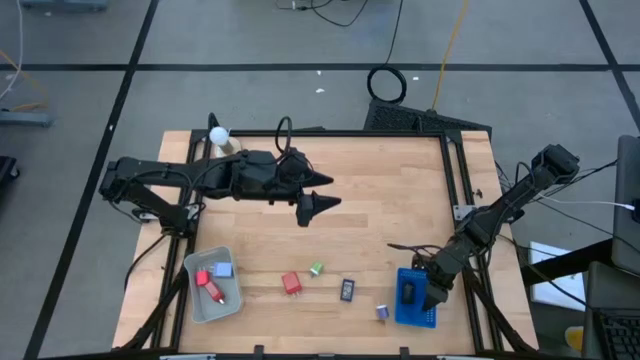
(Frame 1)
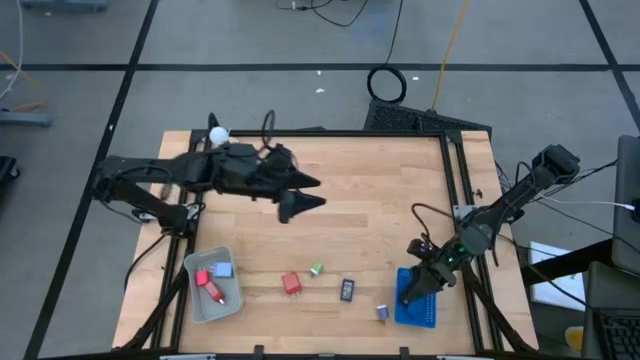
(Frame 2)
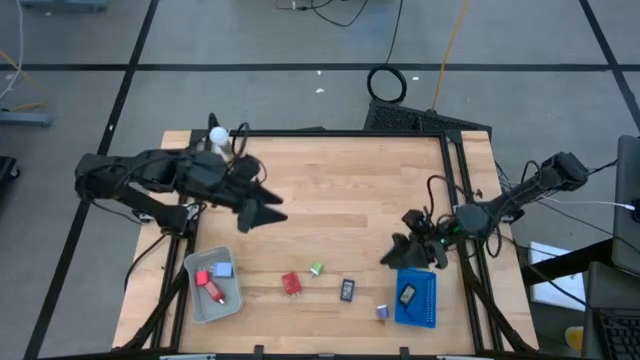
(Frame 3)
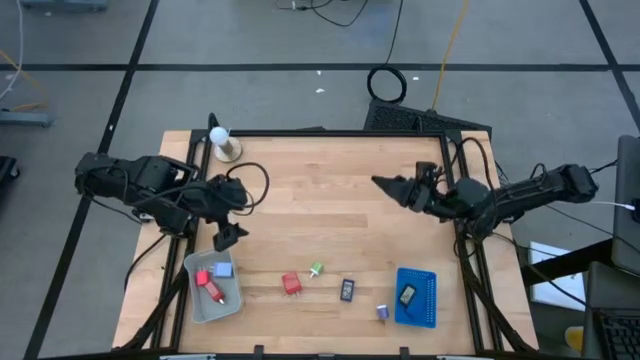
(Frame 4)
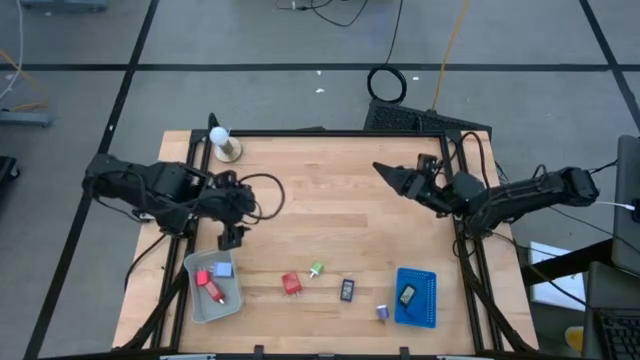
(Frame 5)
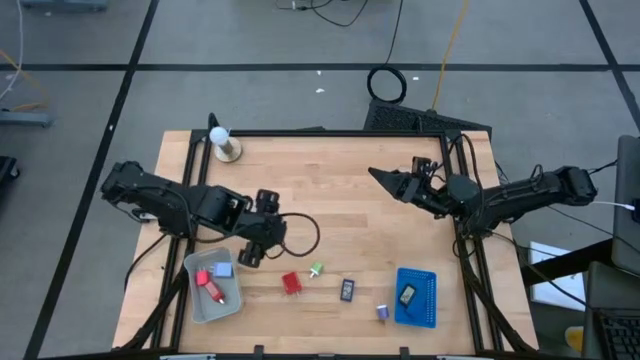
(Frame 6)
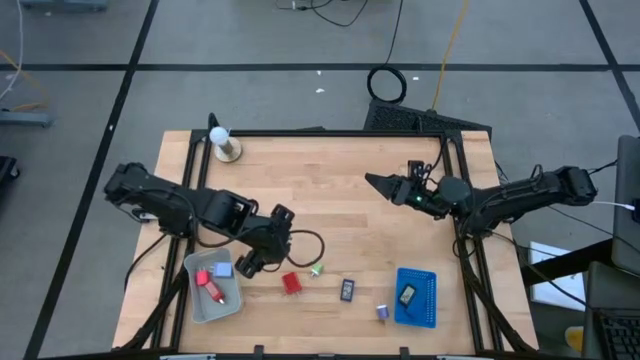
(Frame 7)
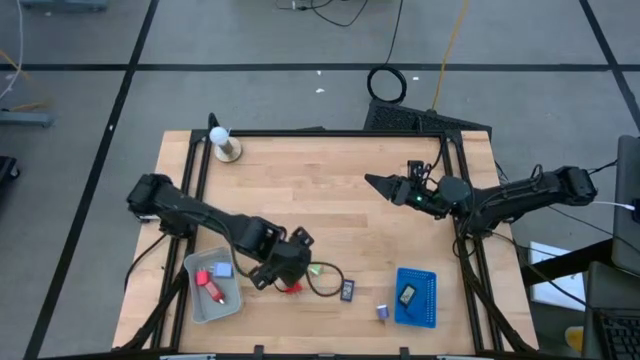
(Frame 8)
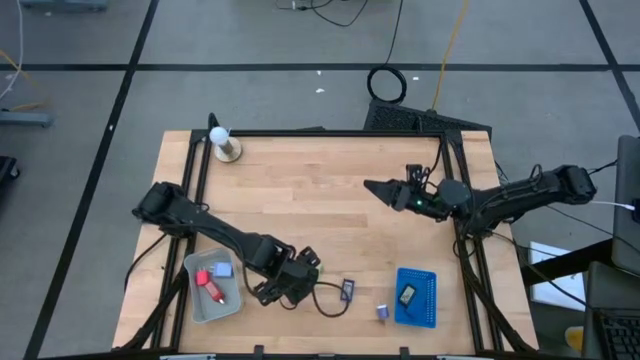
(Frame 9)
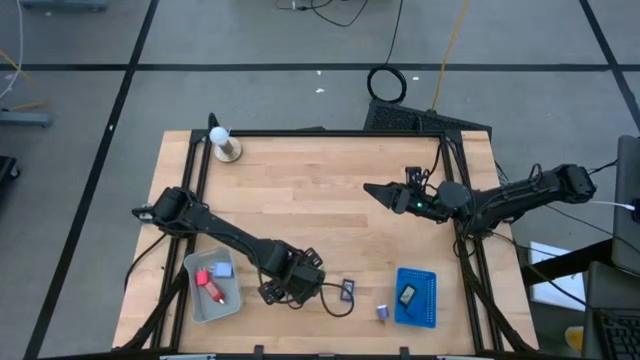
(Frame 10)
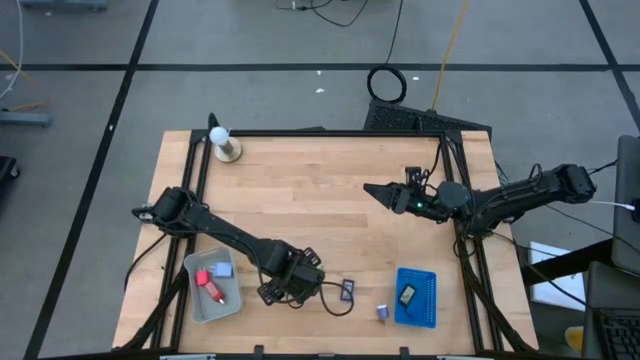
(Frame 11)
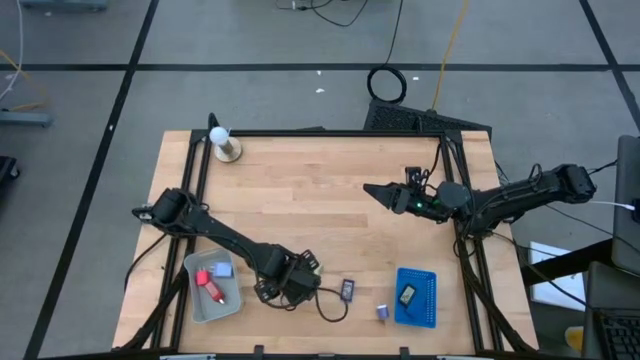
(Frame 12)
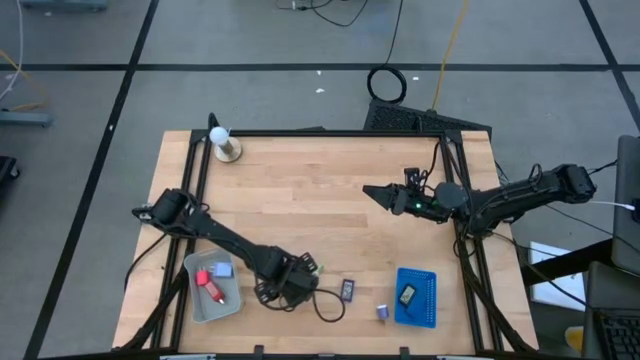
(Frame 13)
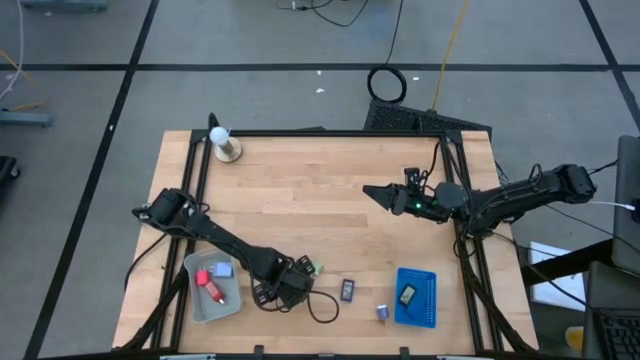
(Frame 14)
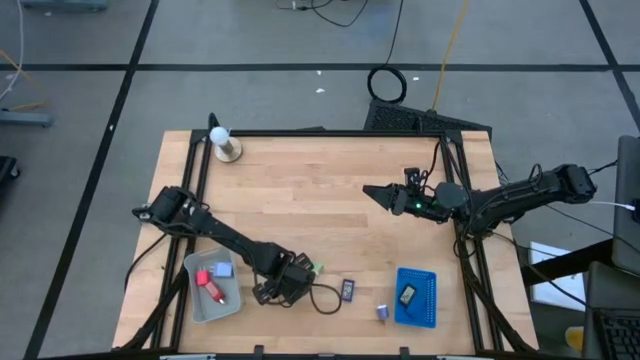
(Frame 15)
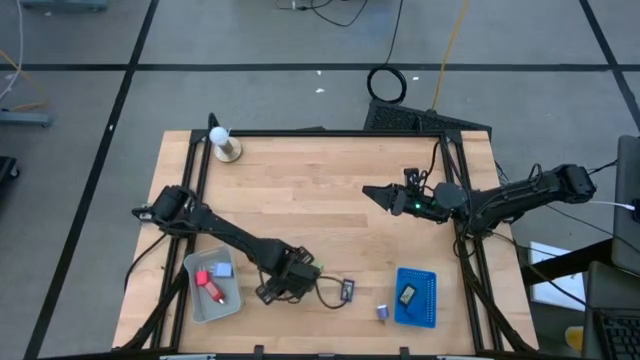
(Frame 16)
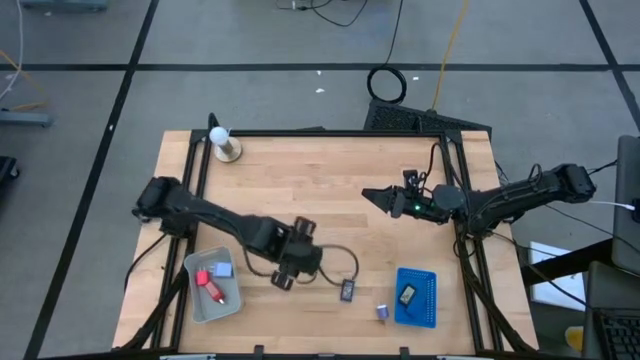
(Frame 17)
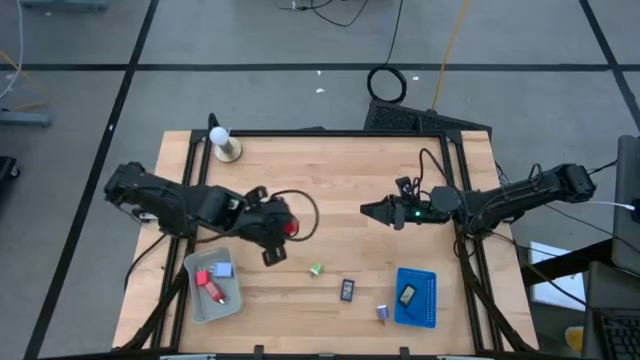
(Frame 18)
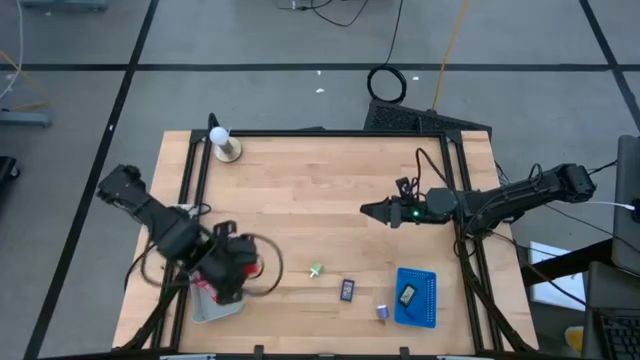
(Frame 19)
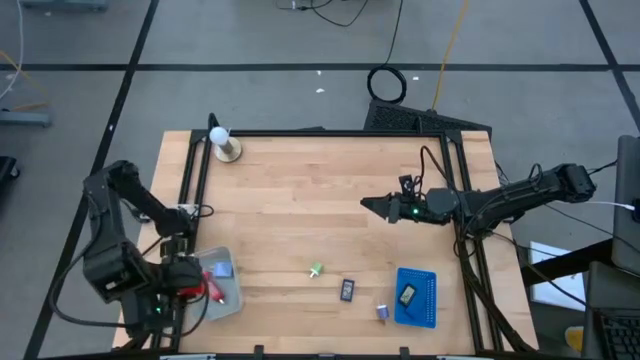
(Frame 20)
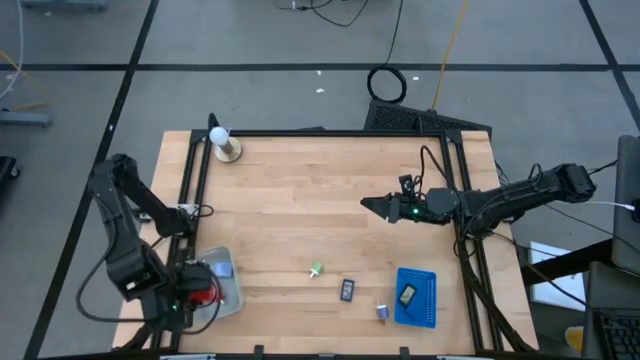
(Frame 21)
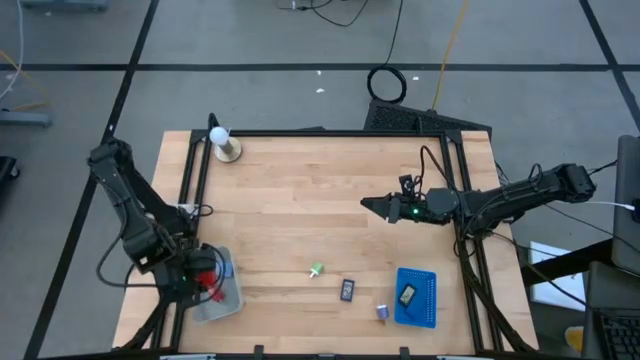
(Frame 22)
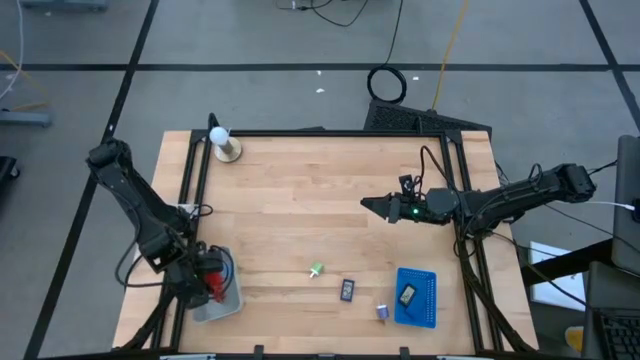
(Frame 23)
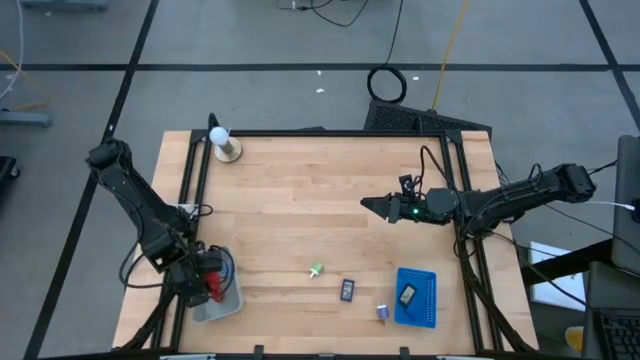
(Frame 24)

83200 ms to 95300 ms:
Task: Pick & Place Office items
Put the red power adapter into the gray bin

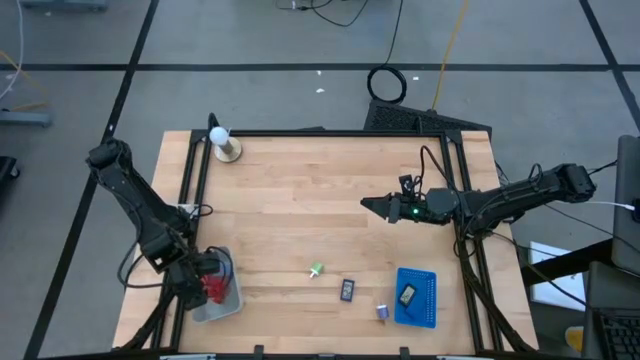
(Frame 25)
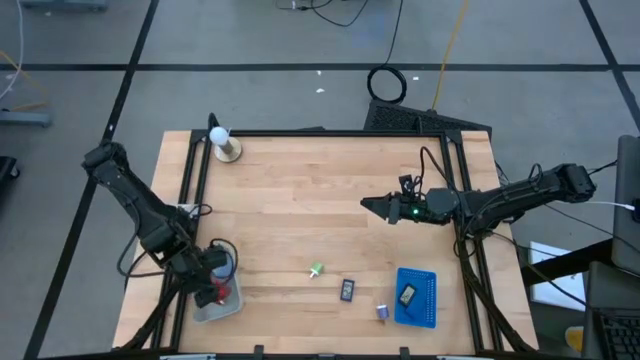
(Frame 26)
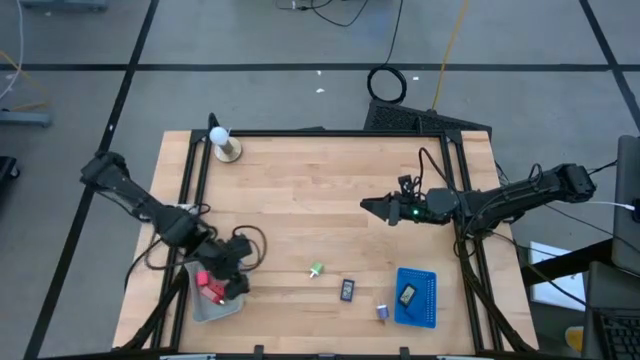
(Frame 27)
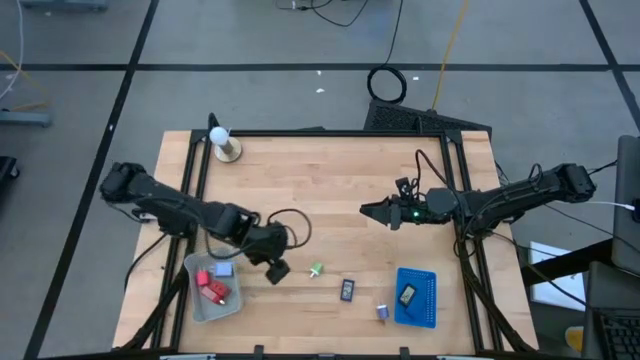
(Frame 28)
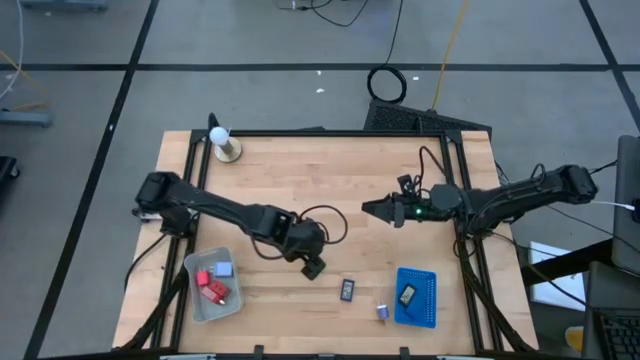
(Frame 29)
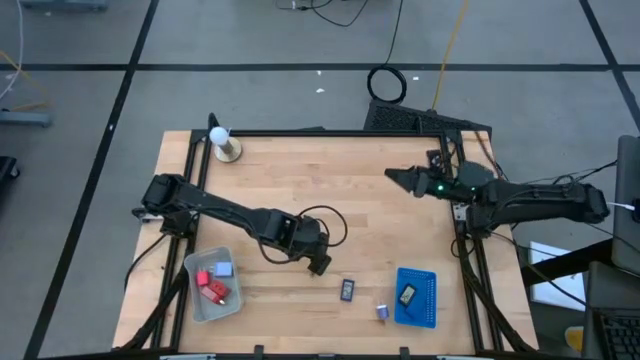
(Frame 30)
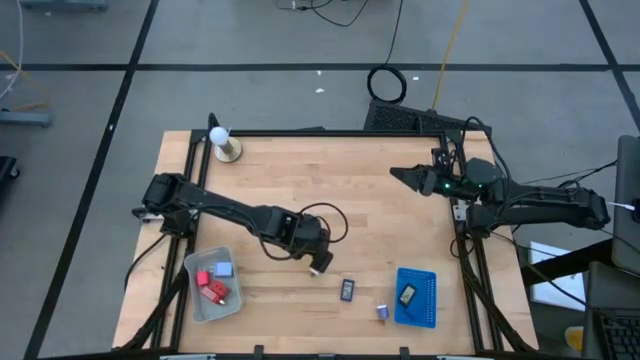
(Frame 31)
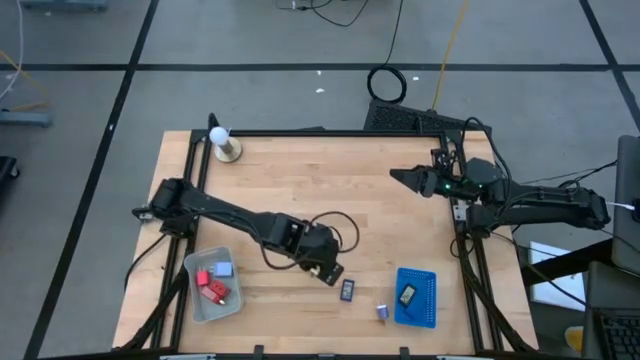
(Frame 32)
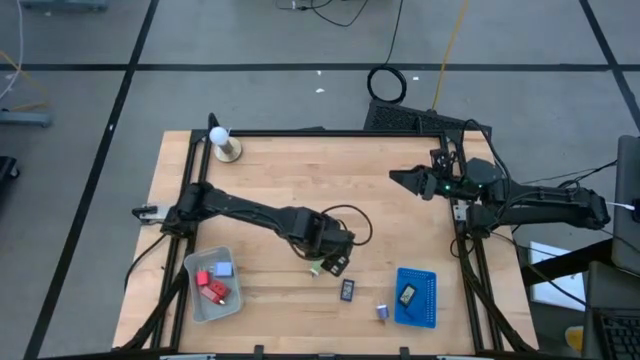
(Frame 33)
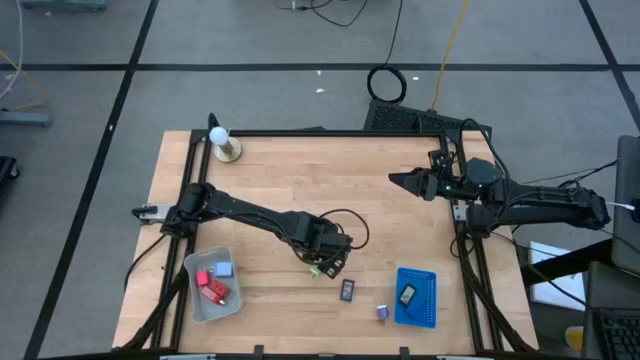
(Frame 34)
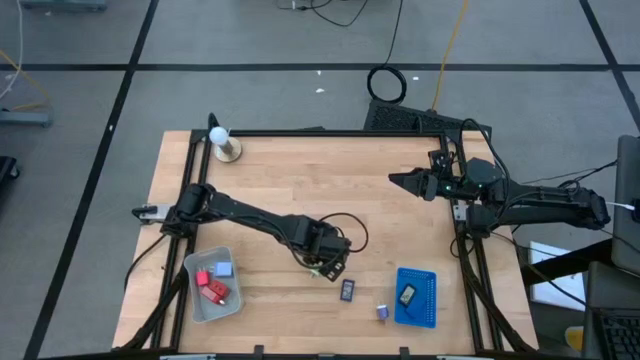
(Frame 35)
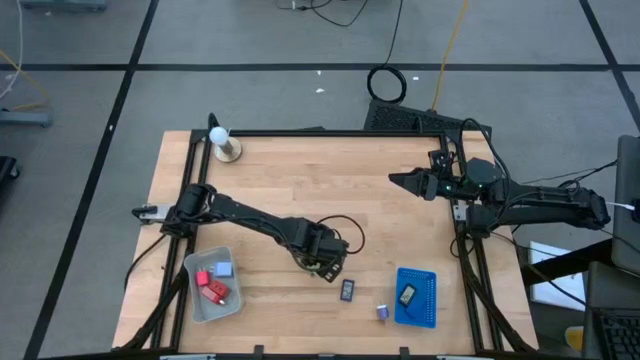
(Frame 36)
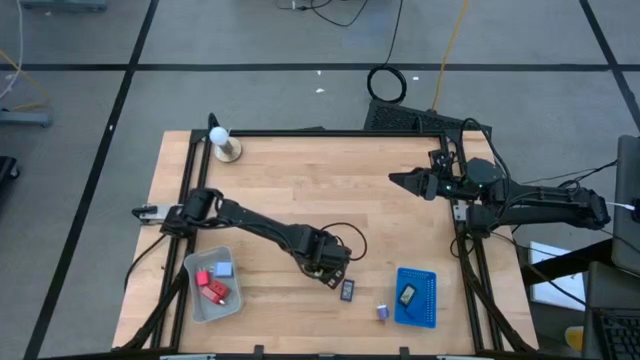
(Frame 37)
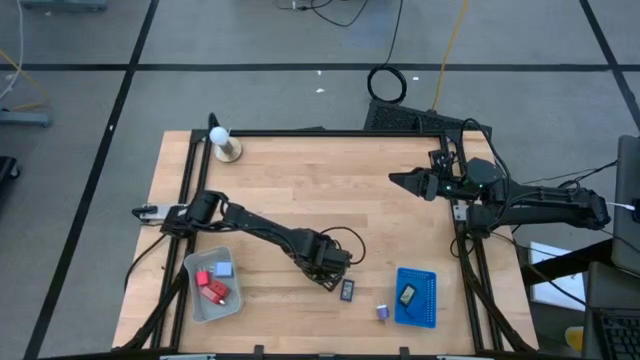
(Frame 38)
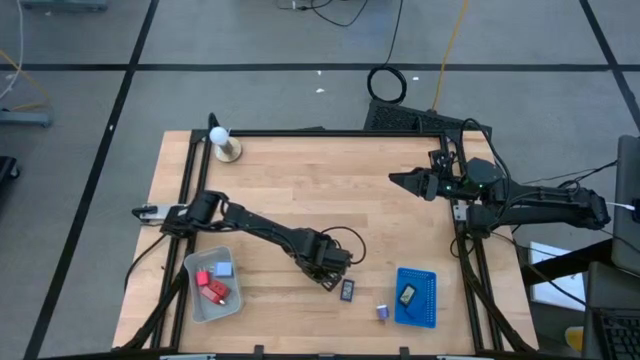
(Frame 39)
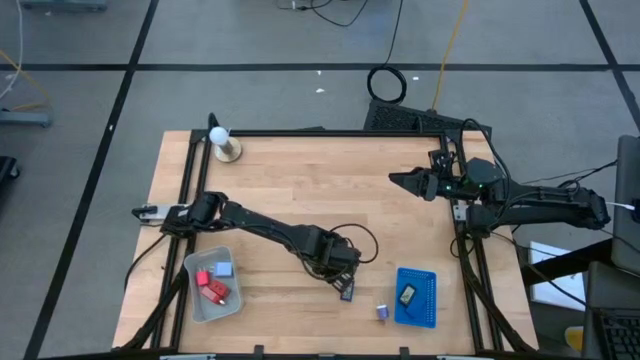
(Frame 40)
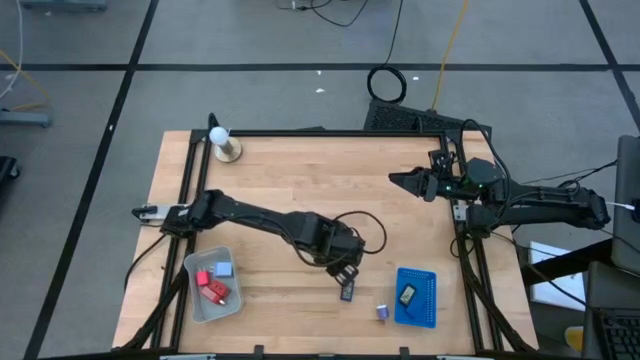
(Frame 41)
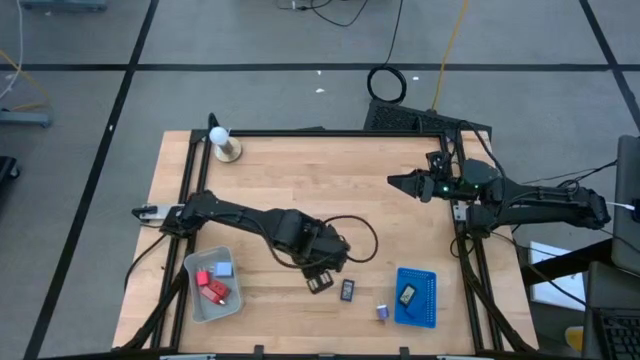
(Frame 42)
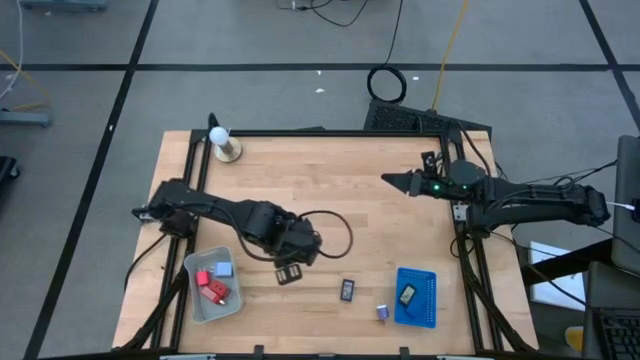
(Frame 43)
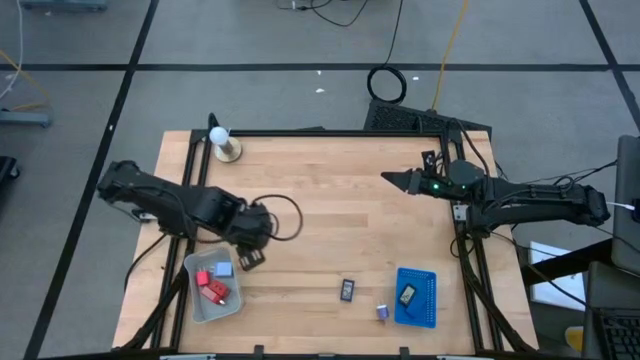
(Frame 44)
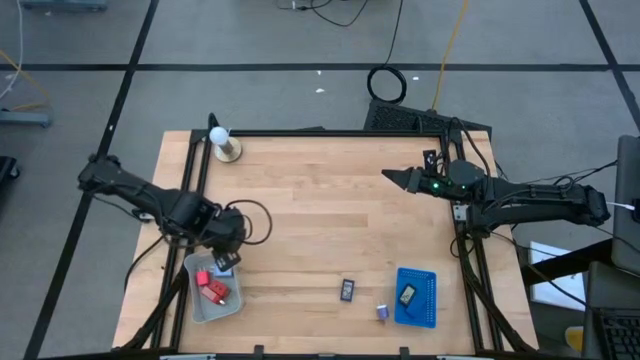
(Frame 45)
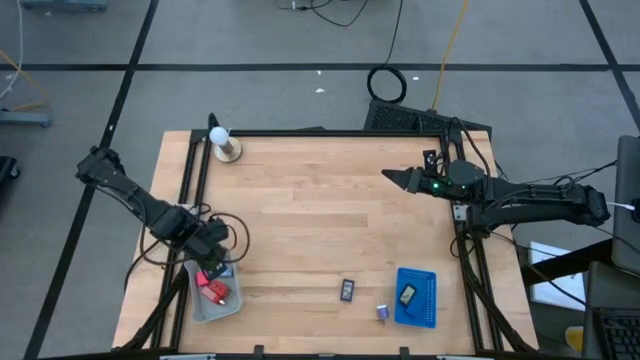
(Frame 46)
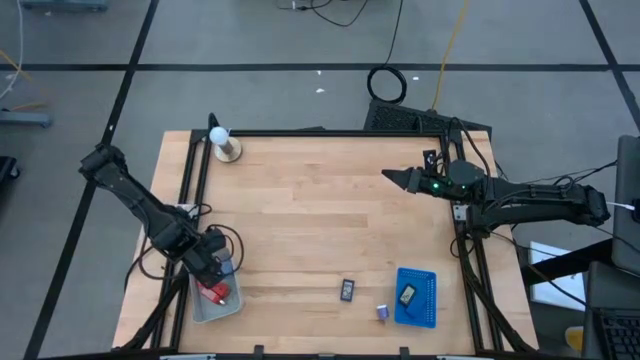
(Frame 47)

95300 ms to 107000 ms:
Put the green power adapter into the gray bin
